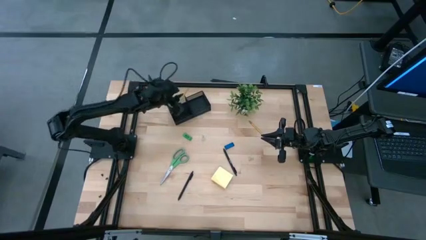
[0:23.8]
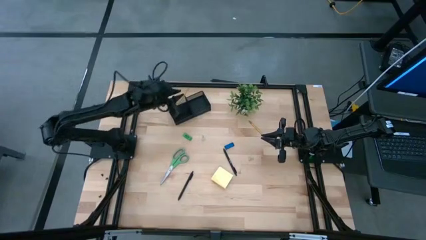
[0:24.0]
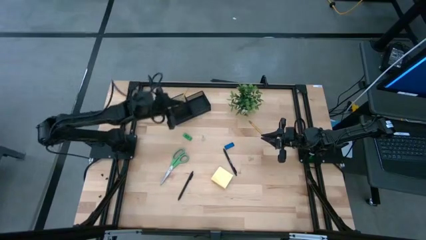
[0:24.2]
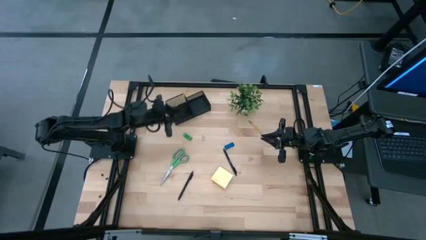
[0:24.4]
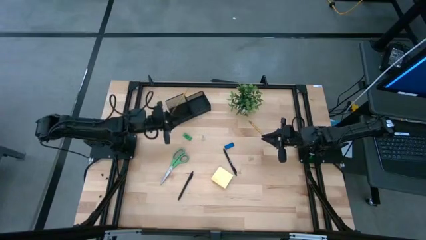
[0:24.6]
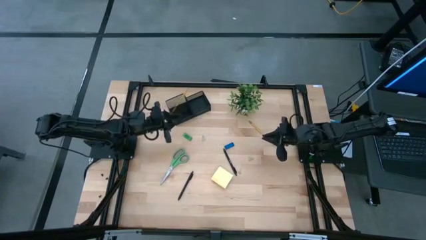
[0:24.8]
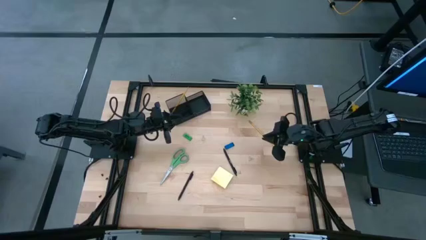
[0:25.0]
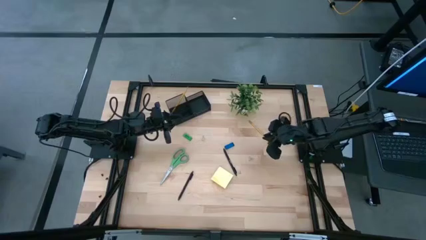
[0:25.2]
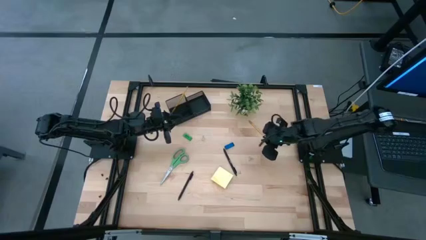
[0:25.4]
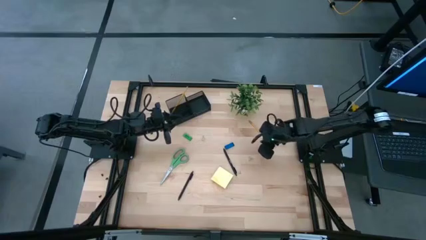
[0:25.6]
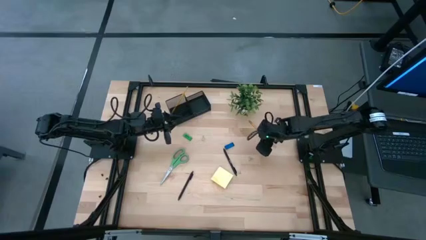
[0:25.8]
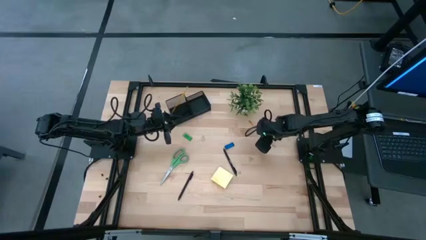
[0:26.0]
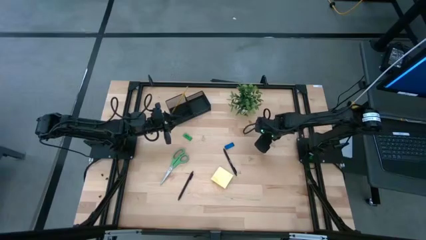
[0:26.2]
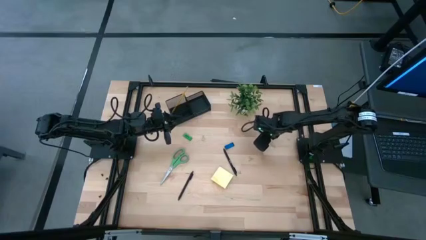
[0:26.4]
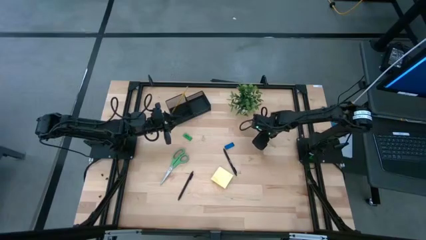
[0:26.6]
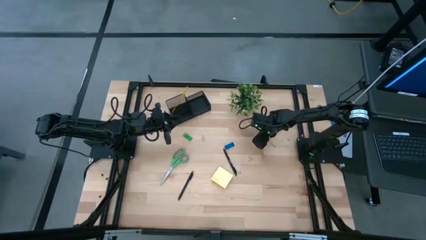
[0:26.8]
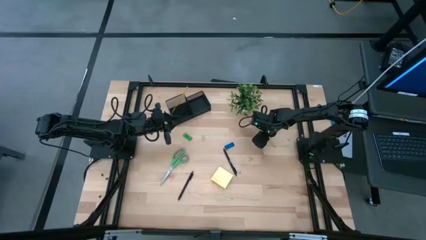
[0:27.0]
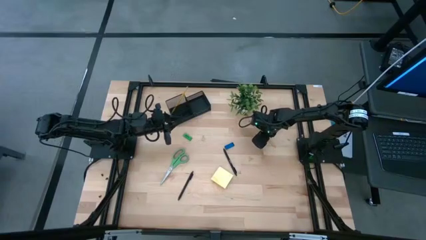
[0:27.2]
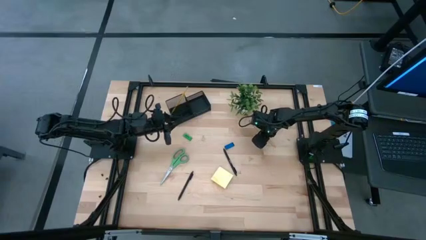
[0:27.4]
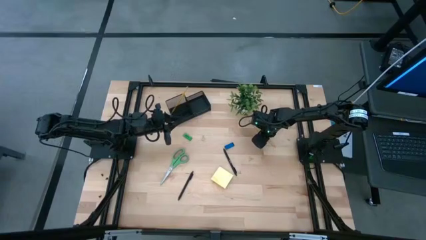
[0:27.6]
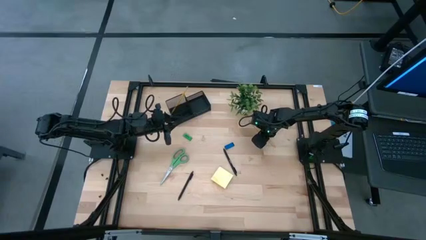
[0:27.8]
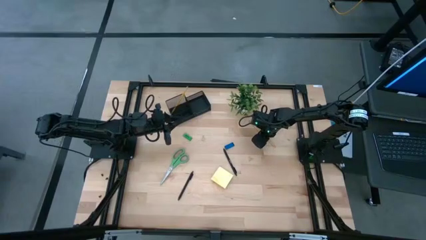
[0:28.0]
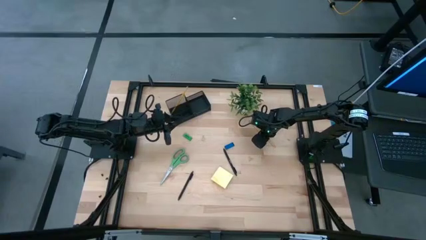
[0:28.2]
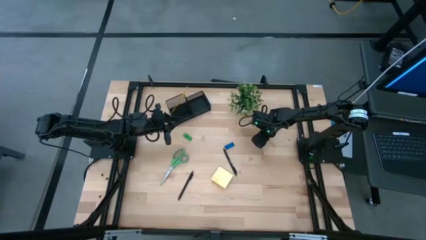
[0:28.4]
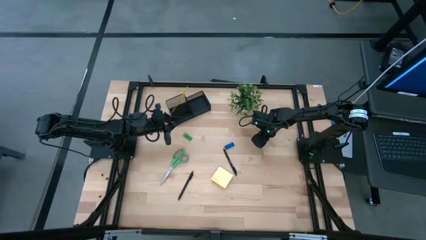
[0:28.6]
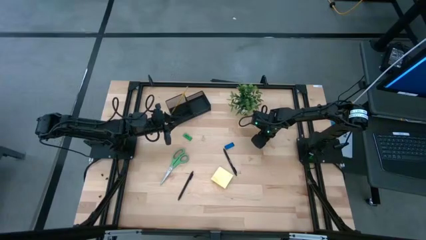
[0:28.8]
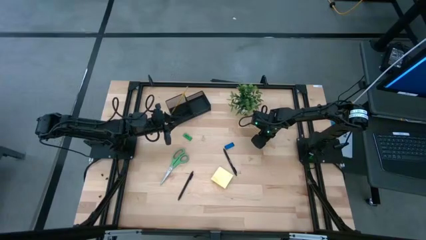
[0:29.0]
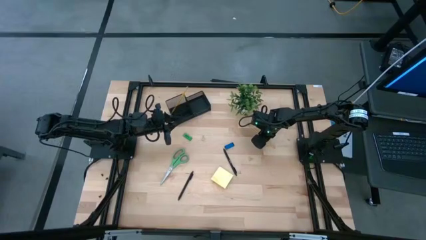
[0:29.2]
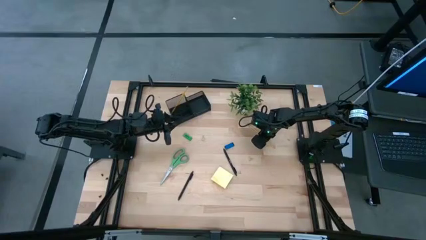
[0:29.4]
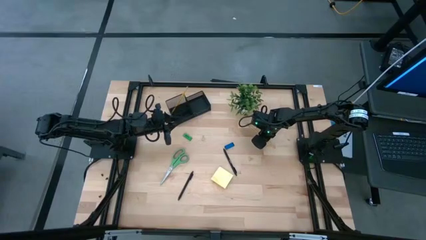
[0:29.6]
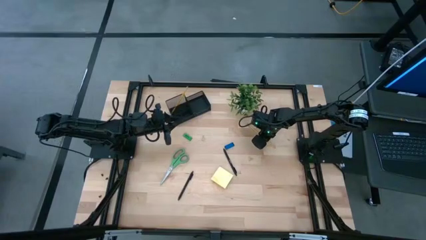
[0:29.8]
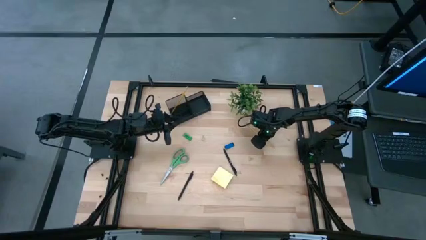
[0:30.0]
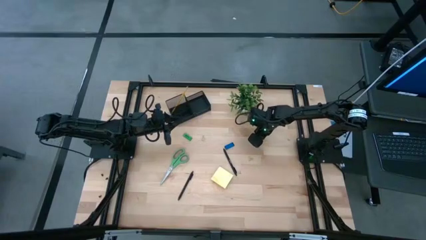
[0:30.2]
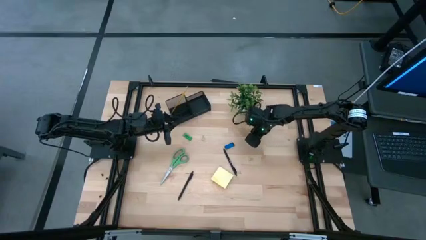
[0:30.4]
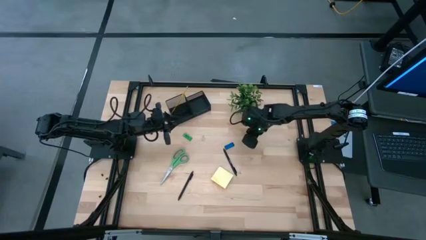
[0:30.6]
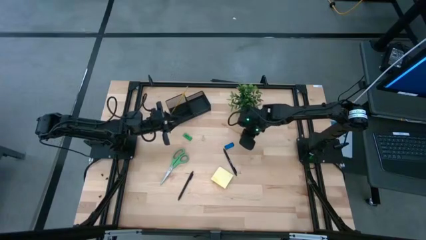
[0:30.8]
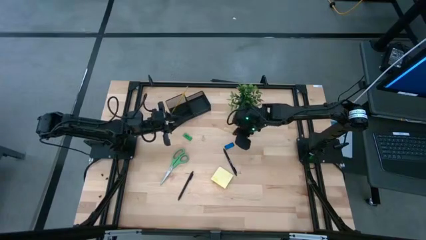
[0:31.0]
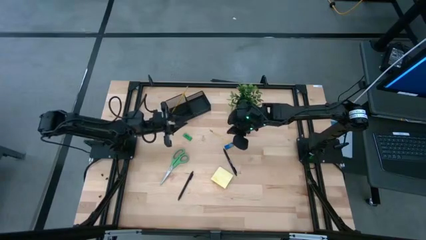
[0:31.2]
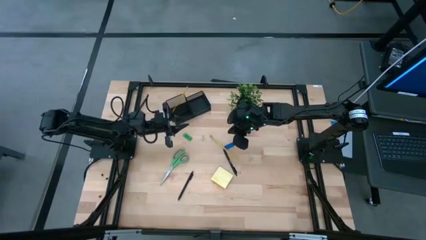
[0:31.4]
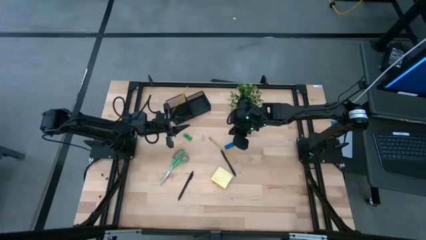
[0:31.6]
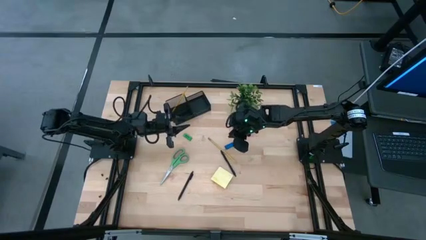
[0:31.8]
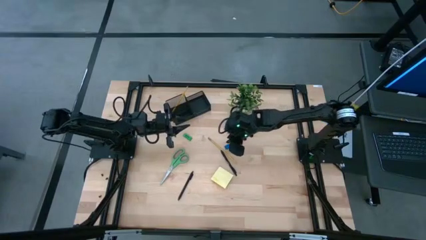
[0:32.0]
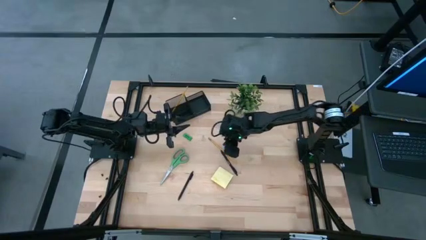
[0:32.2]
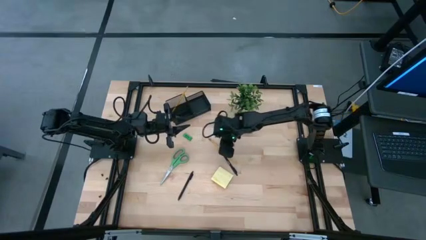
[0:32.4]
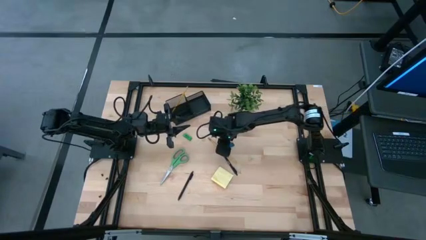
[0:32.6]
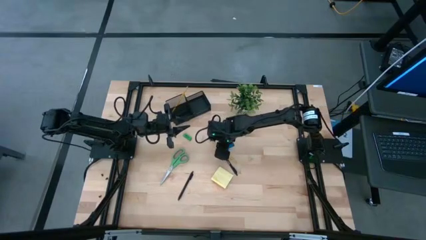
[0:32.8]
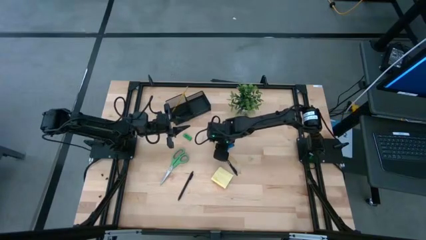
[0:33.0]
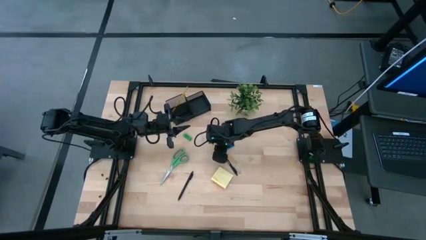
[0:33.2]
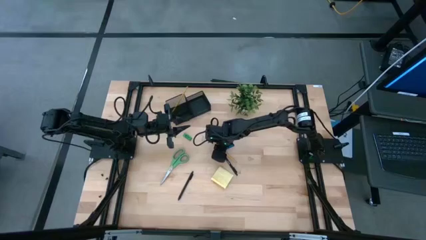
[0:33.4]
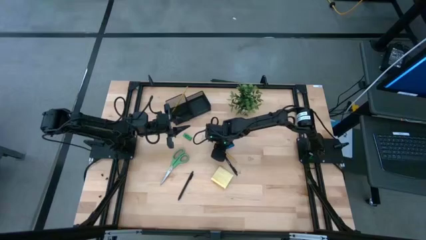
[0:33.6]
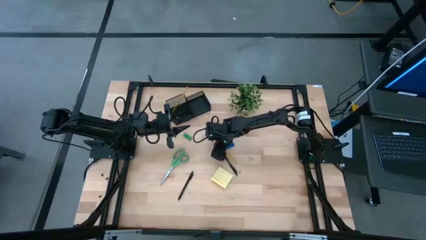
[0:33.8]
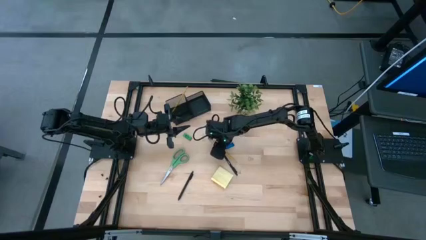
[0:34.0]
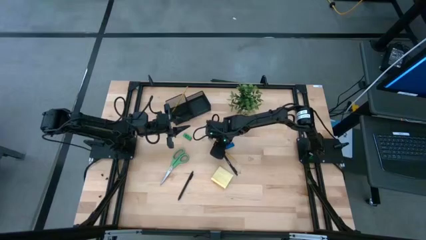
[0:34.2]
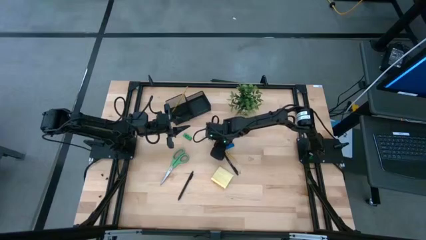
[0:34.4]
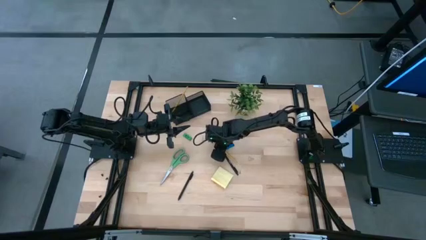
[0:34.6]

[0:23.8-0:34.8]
Task: Pick and place office supplies into organizer
Put the pencil into the desk organizer
